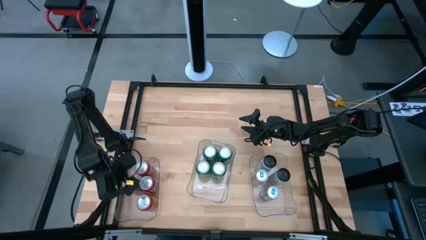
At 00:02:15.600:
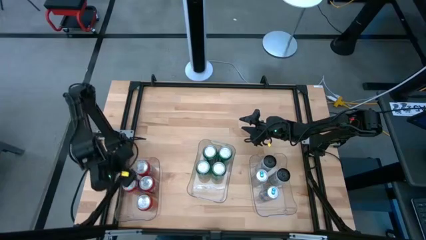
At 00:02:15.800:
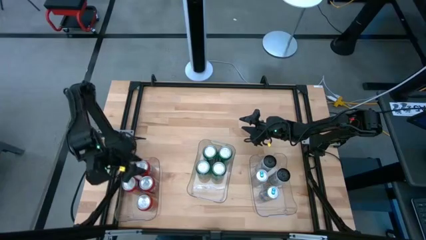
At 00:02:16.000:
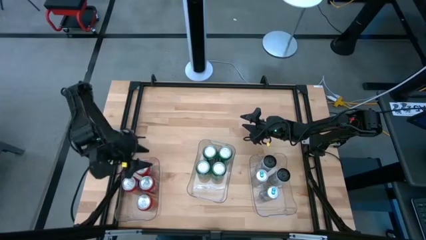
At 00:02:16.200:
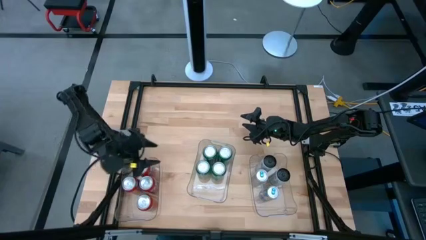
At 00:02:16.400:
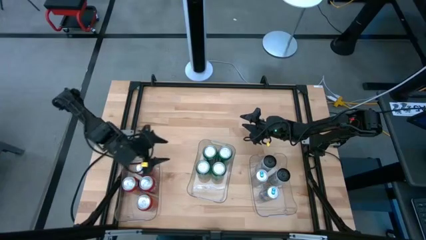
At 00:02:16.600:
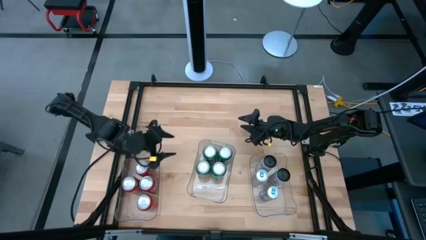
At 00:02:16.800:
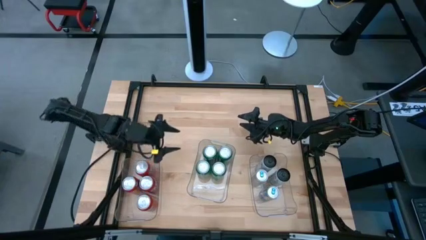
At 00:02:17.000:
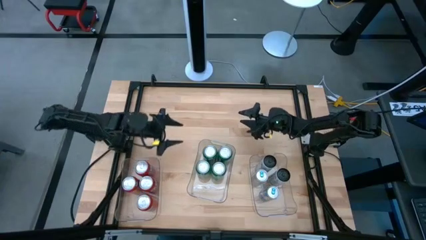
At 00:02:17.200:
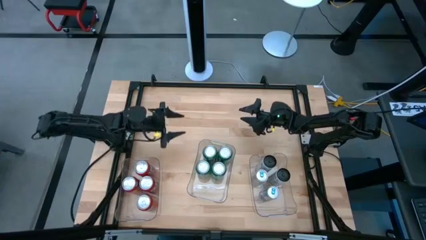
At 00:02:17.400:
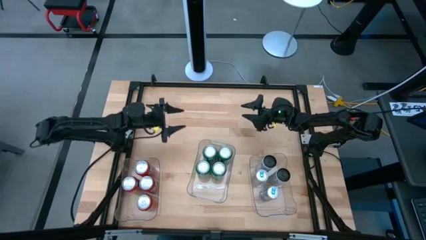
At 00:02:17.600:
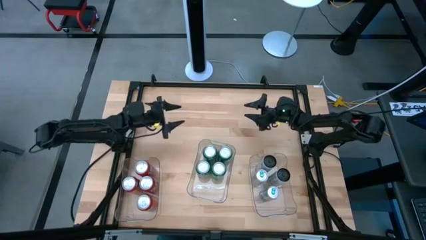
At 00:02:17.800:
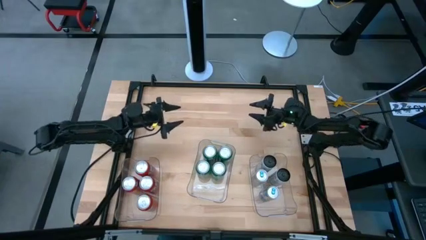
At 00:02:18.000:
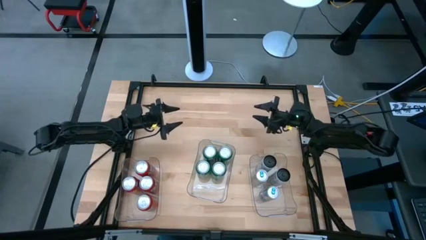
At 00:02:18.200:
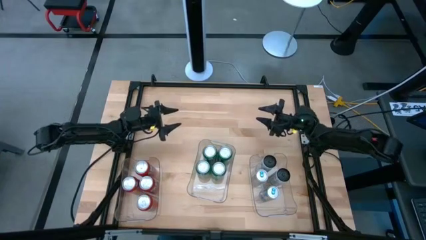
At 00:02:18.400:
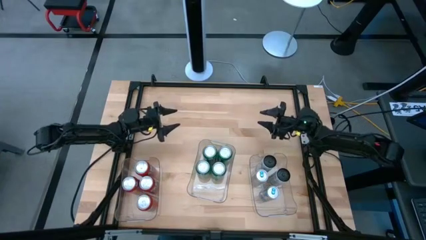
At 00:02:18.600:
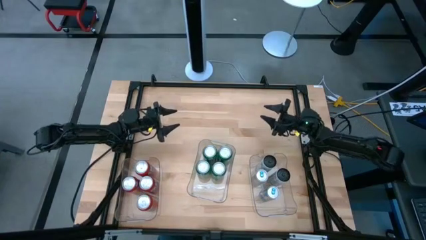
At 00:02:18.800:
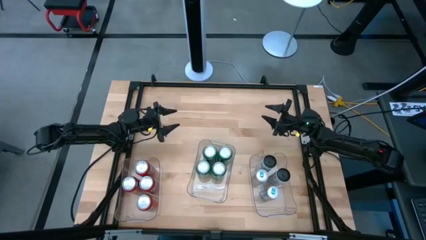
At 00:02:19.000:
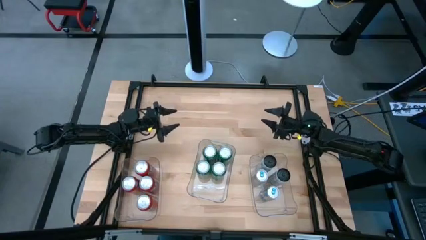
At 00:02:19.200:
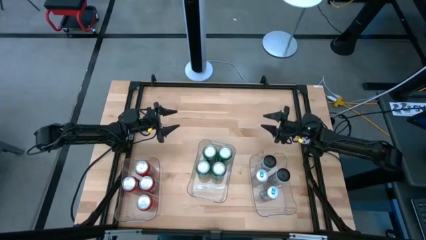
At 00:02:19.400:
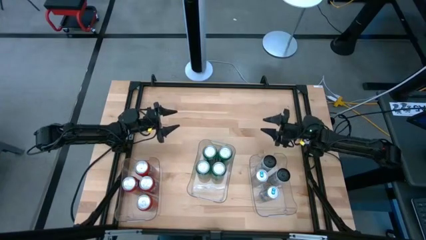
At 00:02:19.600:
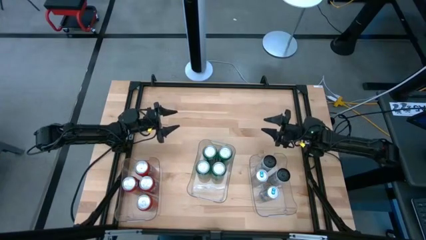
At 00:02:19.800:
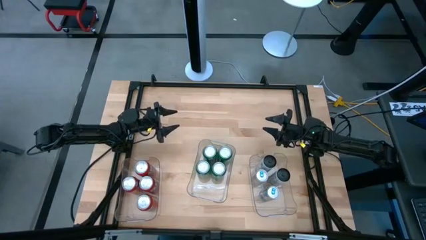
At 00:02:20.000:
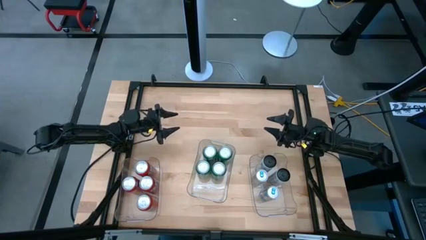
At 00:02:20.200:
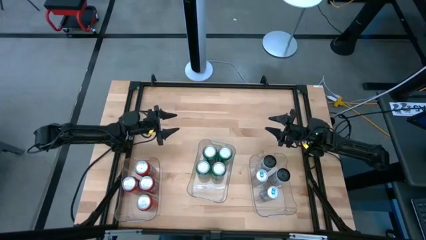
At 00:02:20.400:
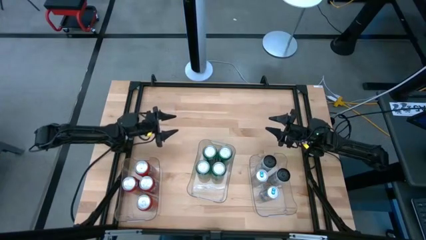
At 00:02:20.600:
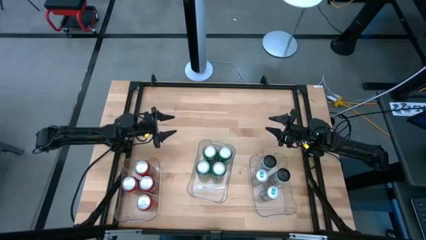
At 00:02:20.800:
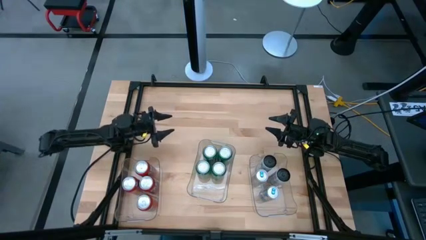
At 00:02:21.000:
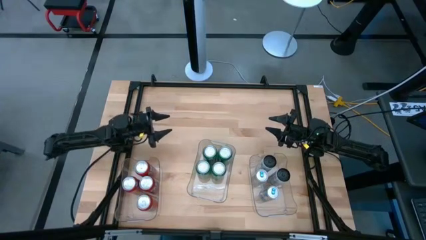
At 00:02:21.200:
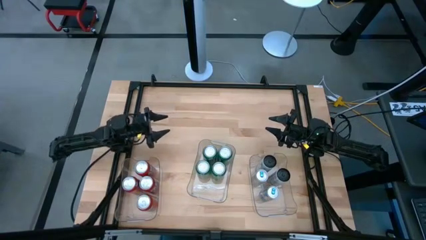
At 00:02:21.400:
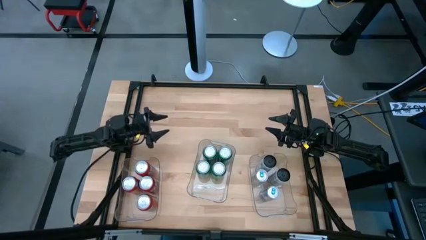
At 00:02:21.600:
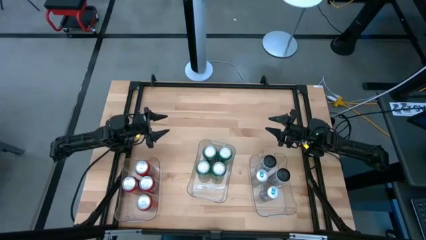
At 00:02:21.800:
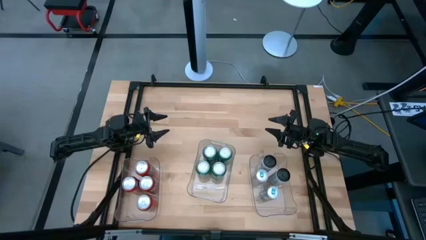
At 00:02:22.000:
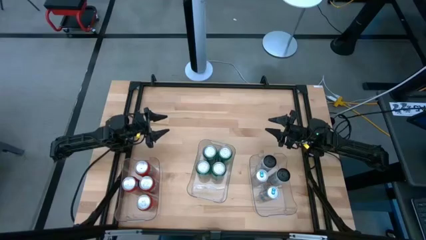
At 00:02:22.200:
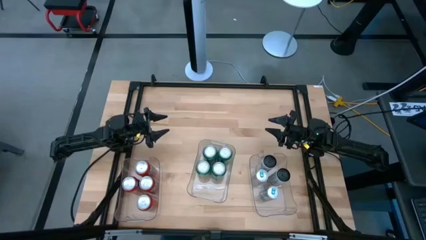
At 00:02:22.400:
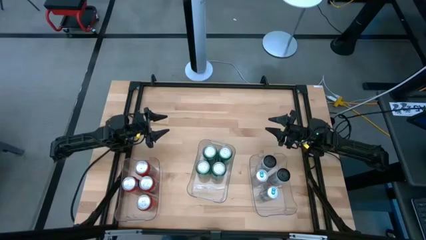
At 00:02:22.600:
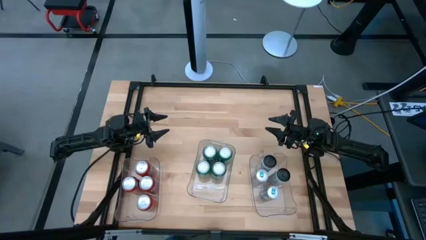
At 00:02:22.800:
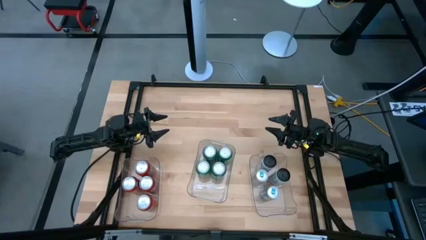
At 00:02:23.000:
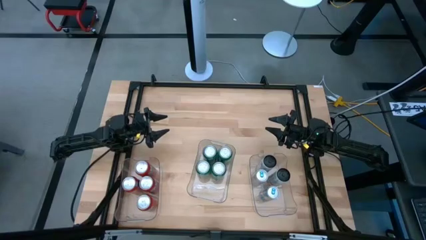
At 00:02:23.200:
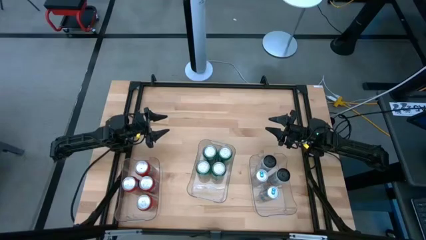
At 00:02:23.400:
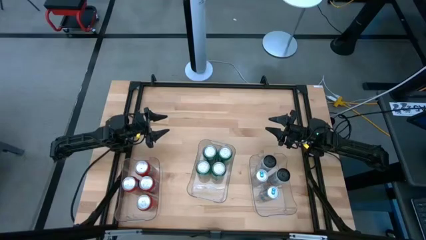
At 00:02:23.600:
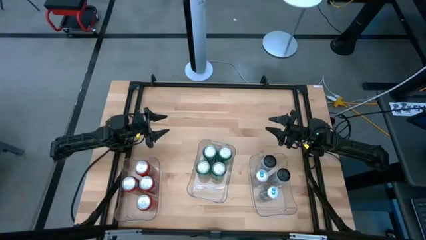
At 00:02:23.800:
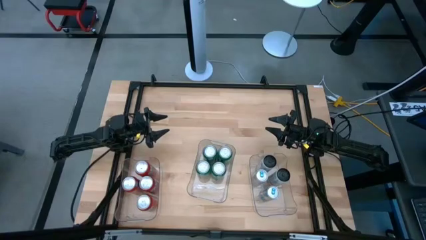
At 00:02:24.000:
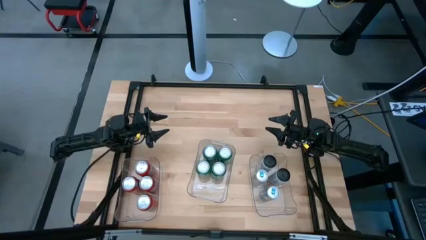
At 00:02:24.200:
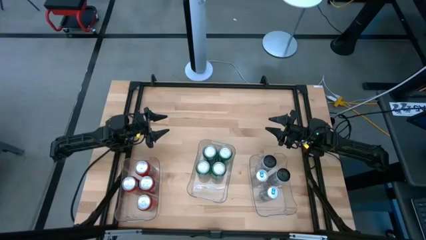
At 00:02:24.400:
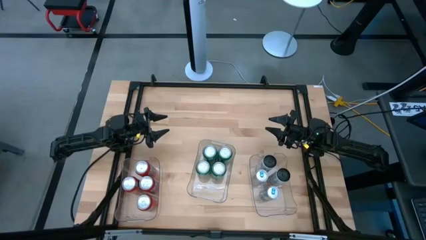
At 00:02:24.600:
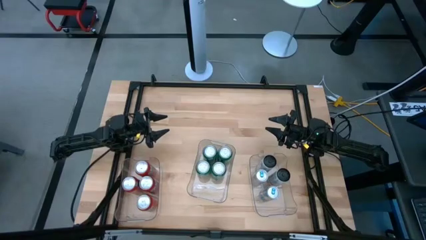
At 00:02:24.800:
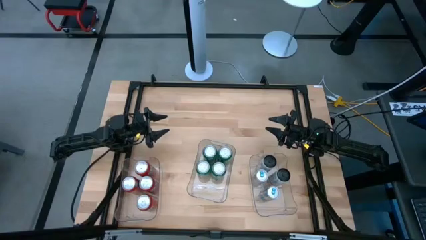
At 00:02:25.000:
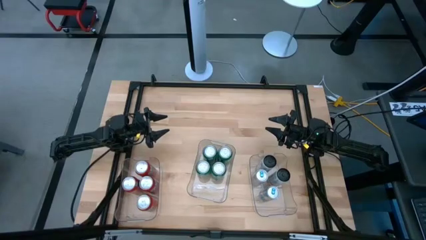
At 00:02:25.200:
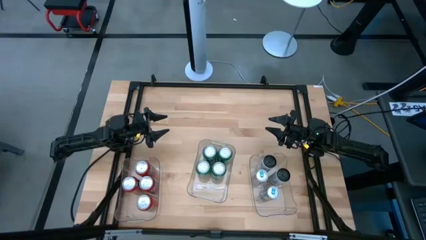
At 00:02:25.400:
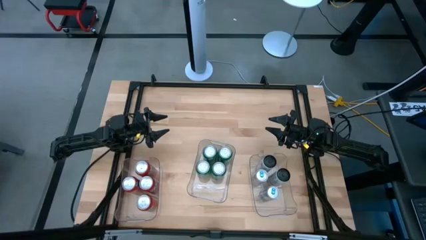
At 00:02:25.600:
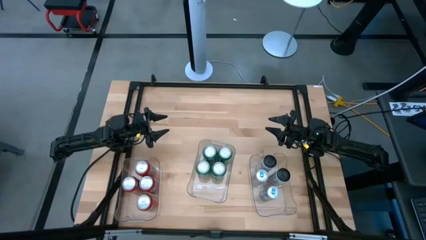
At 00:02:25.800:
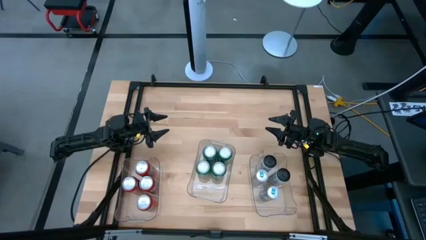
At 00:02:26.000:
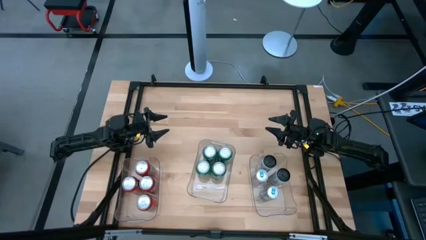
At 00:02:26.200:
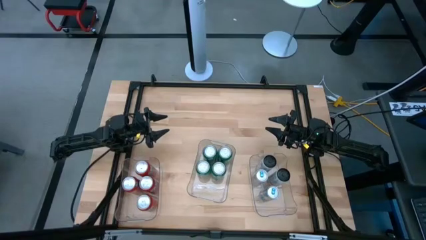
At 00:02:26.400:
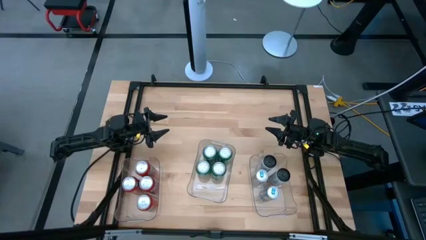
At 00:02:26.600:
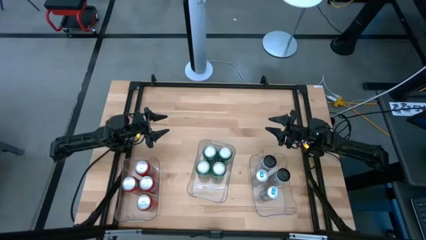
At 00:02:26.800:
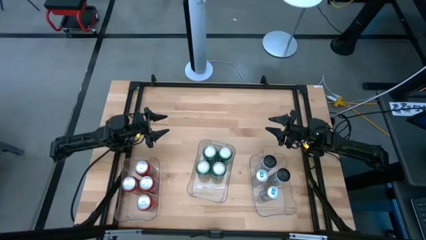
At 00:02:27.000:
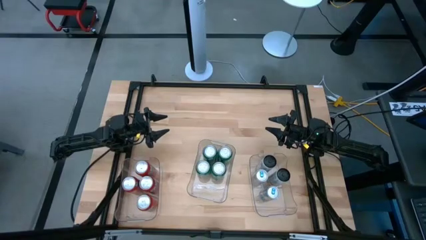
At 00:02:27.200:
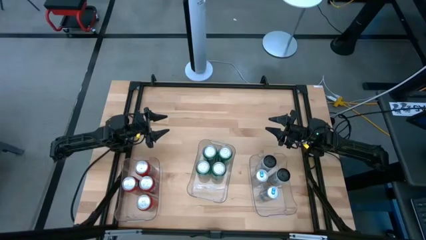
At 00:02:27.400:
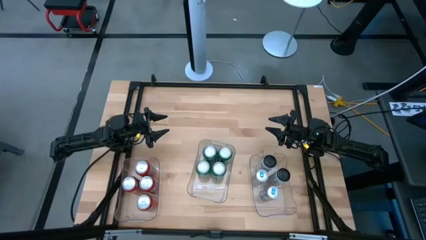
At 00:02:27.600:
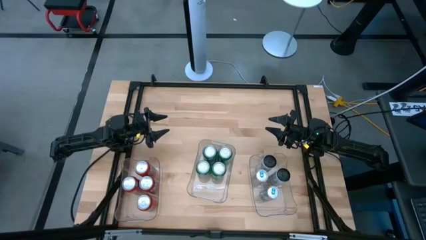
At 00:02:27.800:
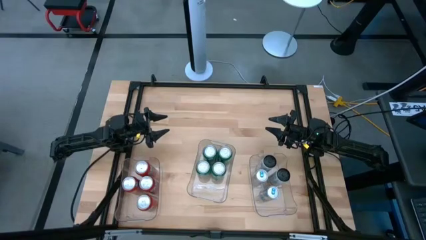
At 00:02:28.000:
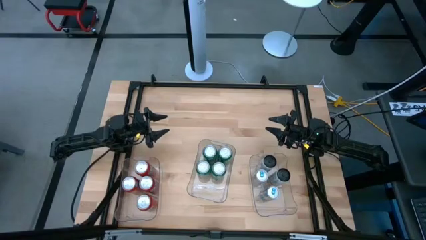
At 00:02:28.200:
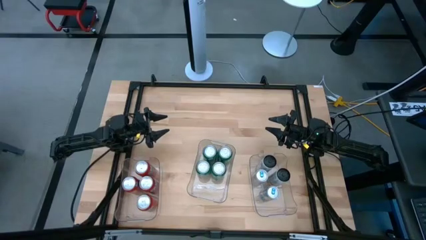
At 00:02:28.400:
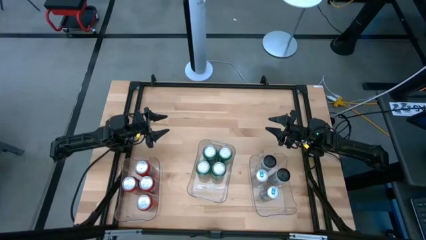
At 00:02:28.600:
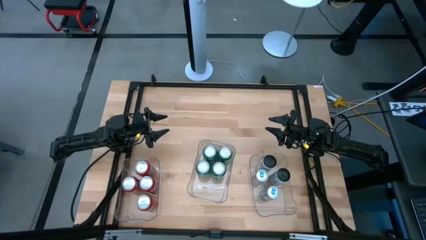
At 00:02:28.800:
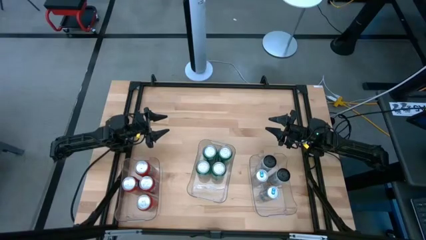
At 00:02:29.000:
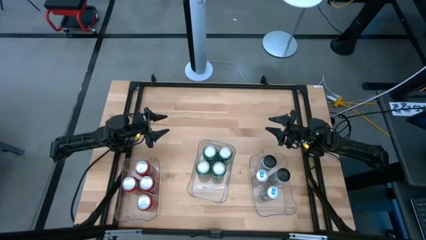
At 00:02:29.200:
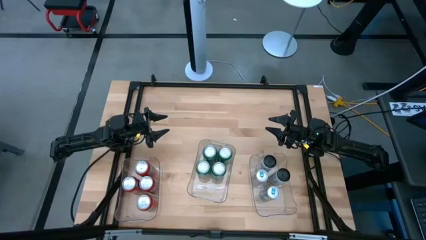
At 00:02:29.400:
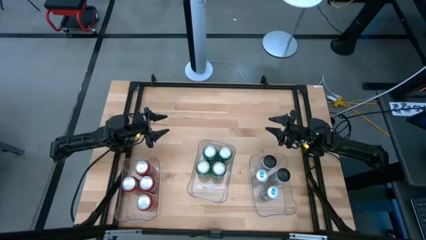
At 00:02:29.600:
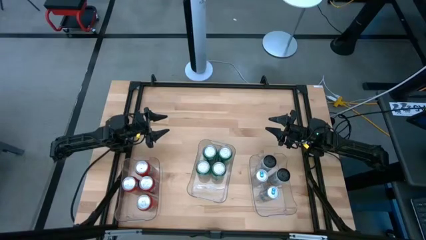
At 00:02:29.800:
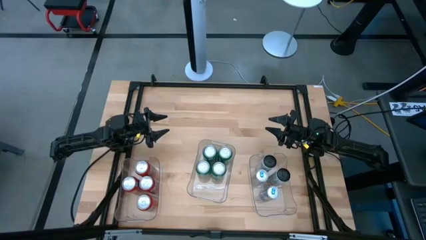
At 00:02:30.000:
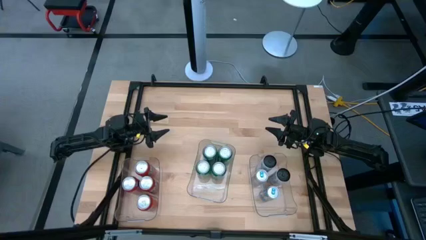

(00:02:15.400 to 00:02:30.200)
Task: Sort soda cans
Return to Home Position
